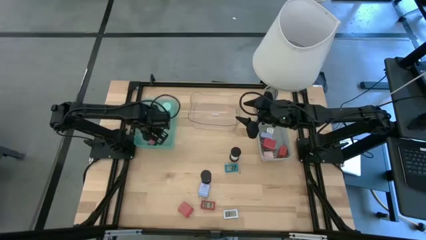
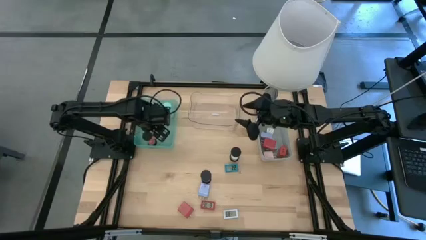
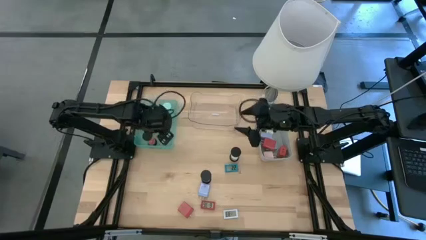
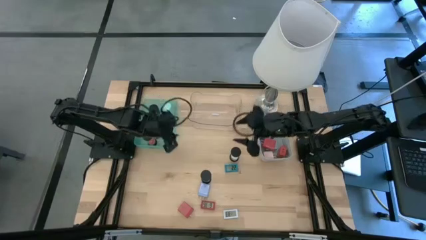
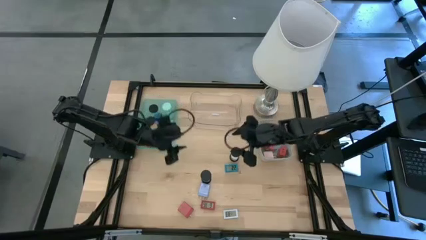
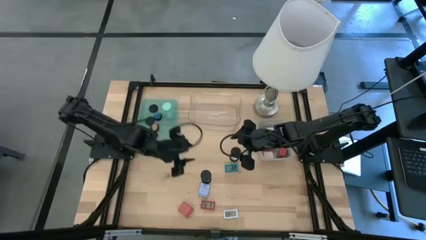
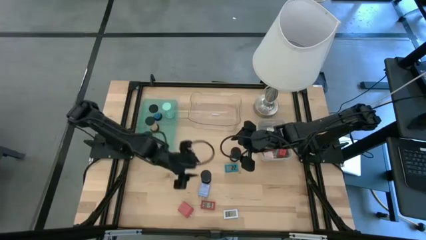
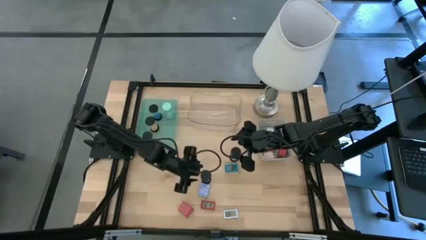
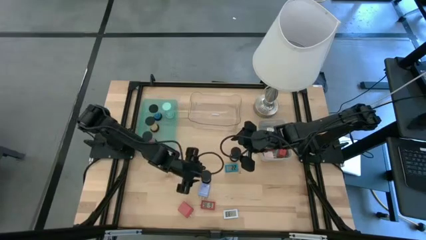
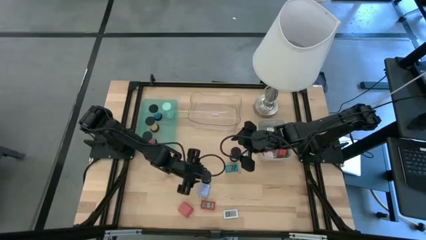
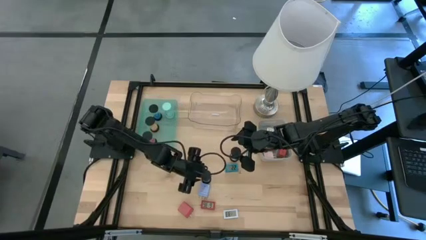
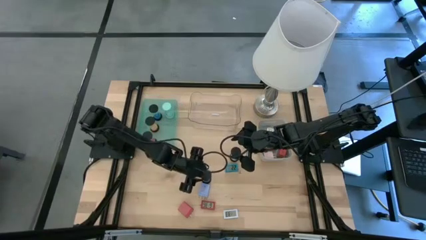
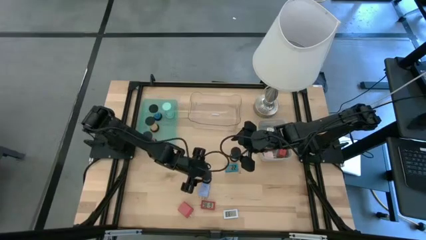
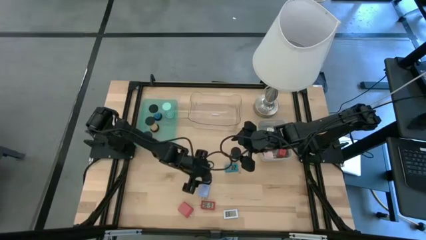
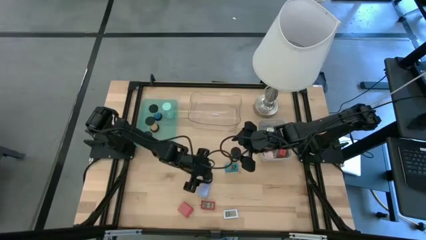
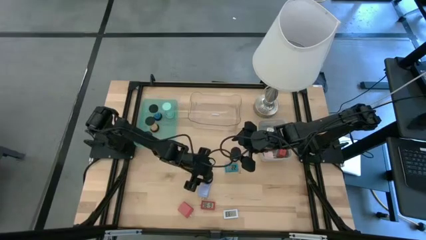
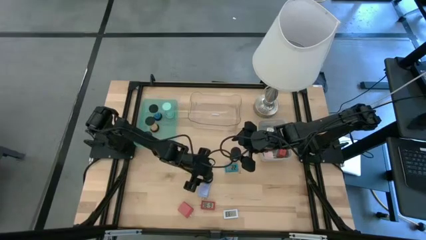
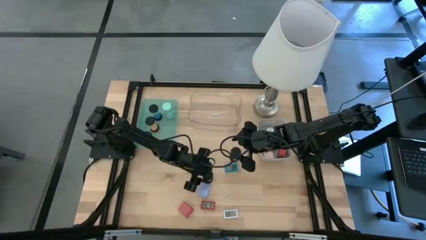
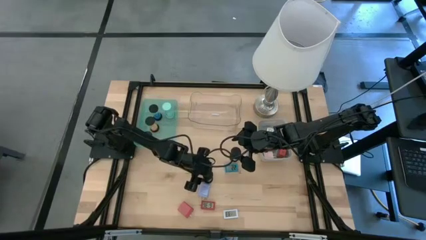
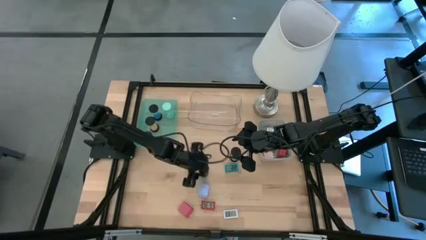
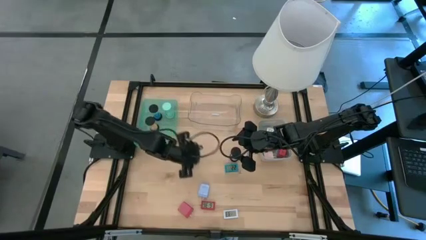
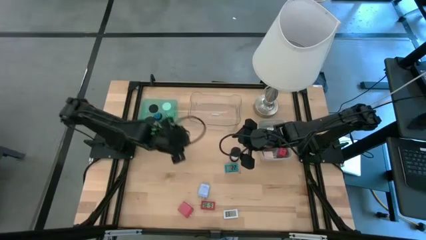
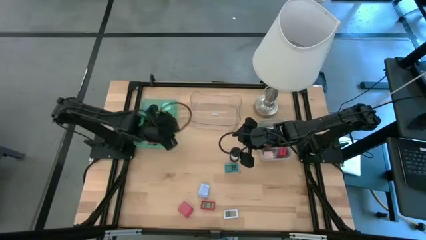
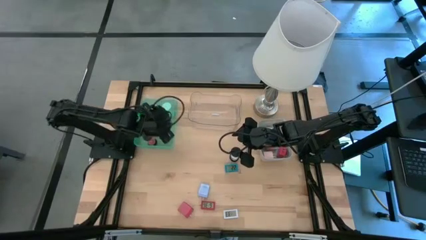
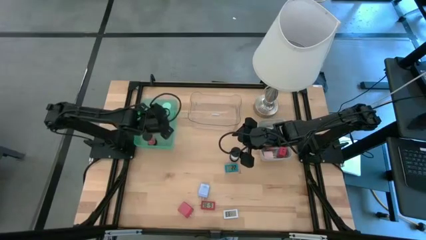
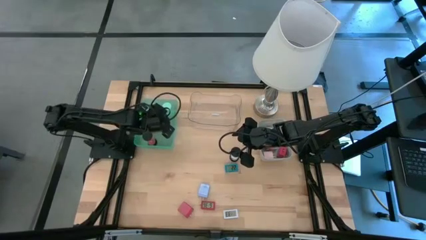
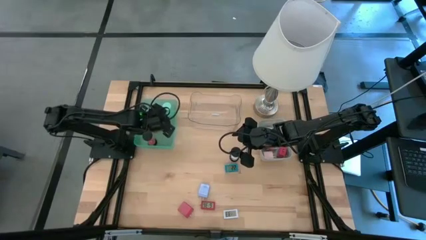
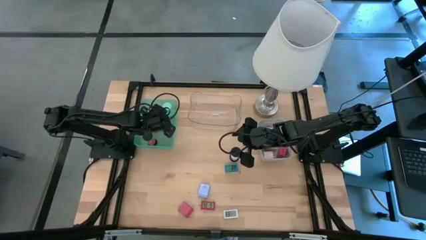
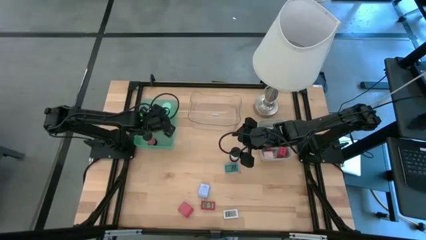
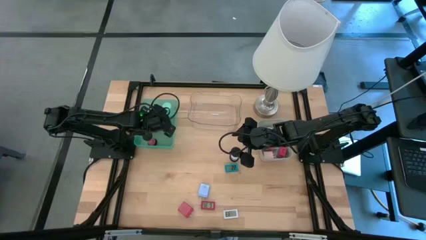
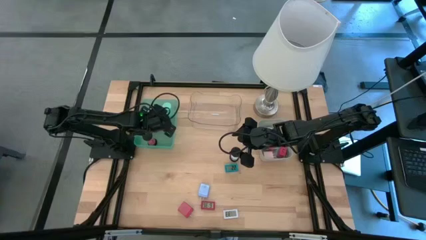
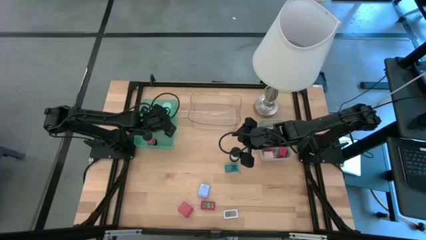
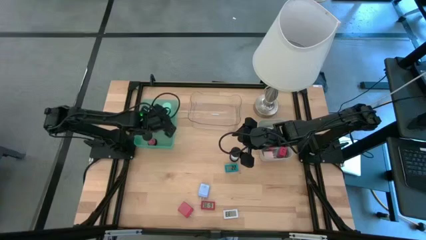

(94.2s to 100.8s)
Task: Pick & Place Office items
Put the black and blue hourglass into the green bin

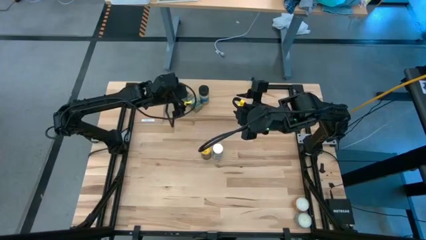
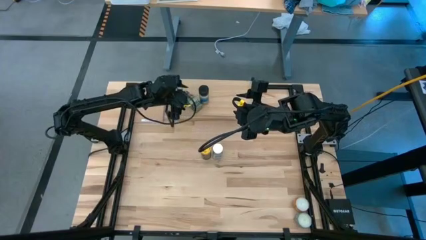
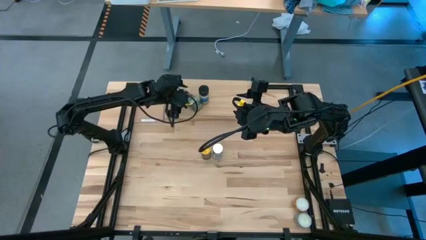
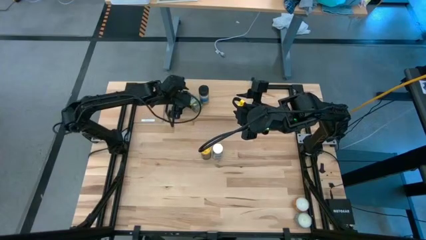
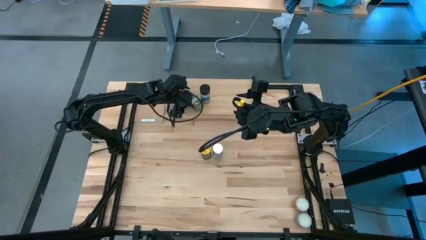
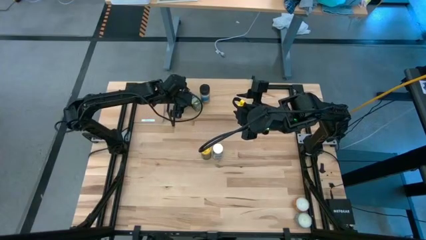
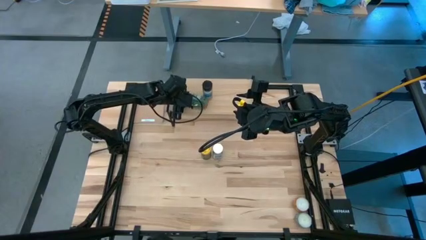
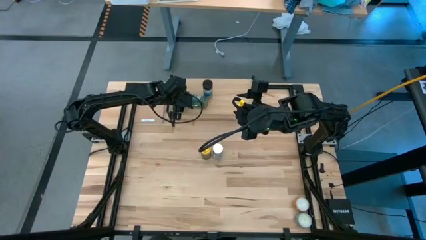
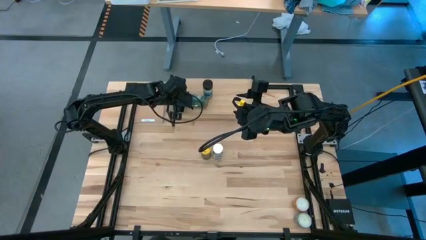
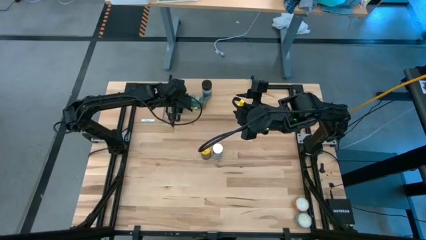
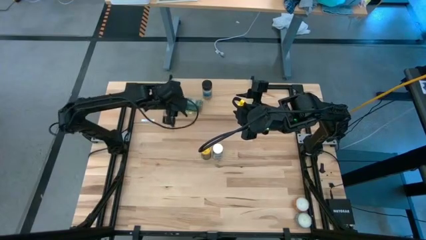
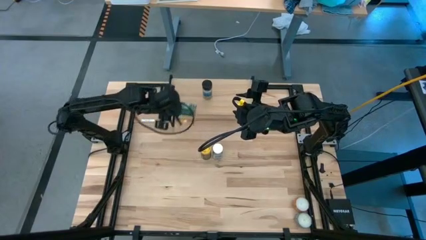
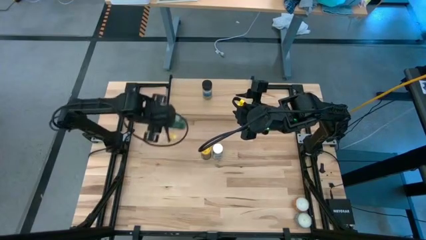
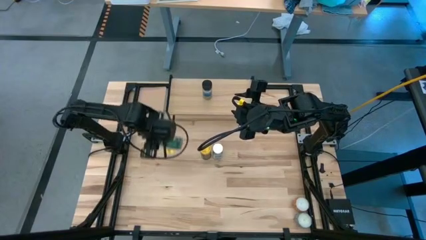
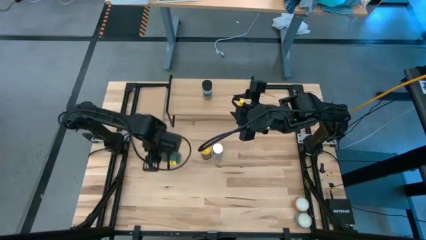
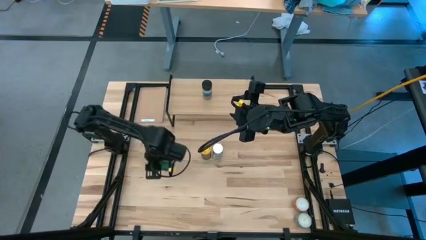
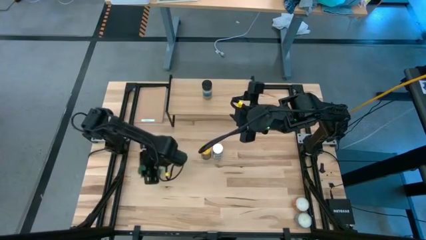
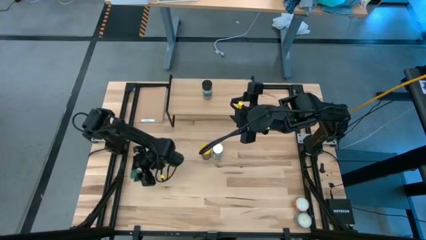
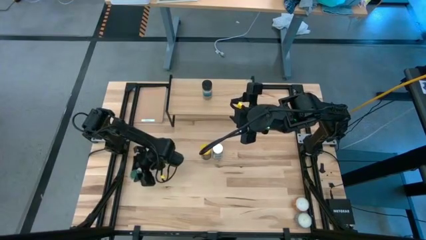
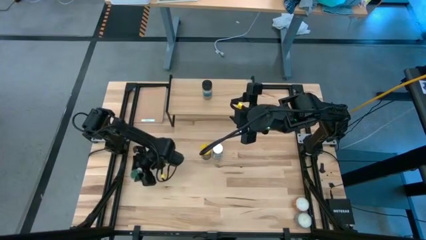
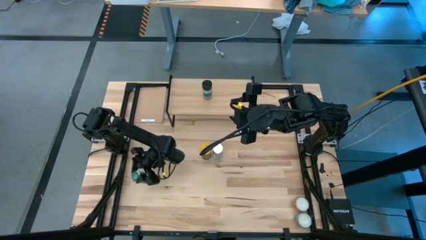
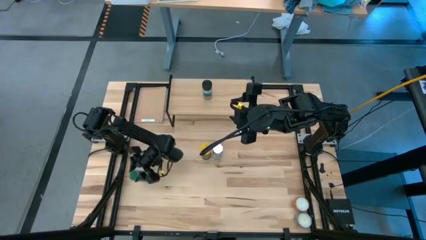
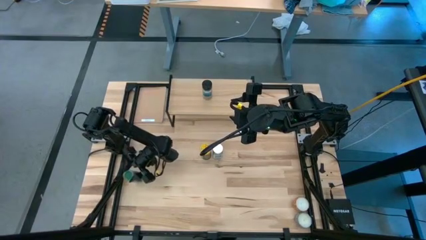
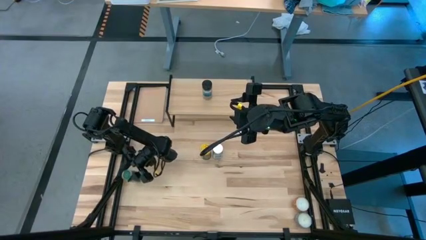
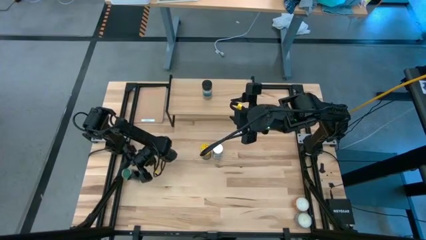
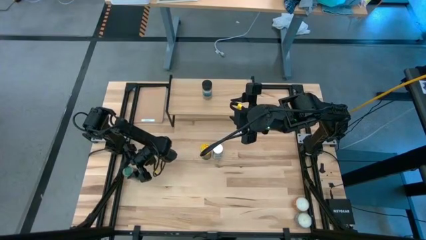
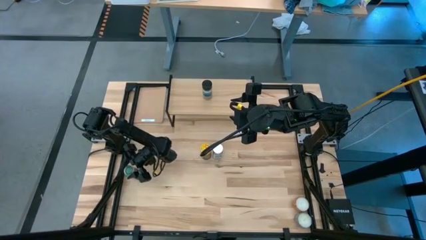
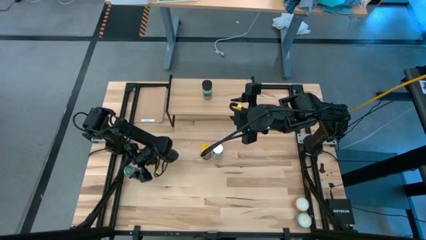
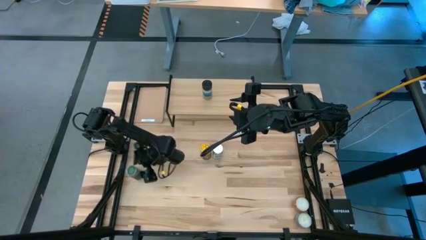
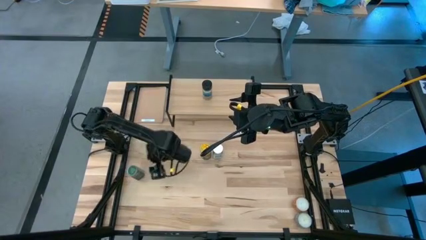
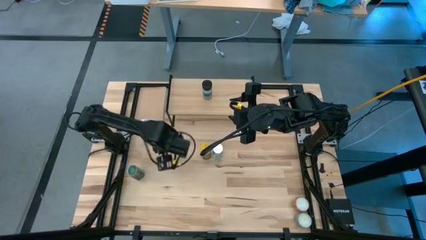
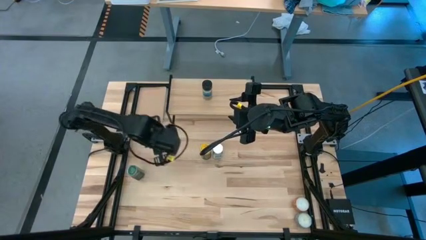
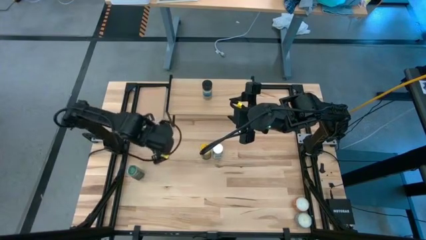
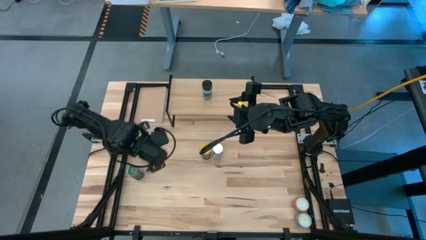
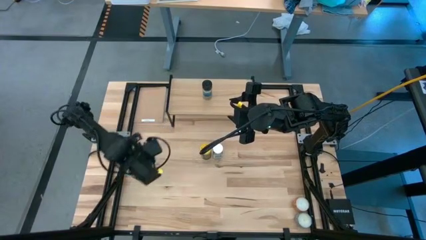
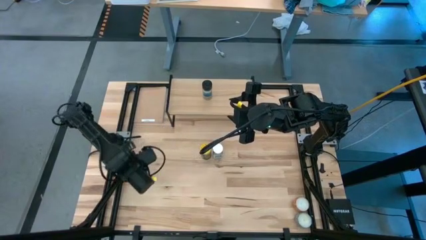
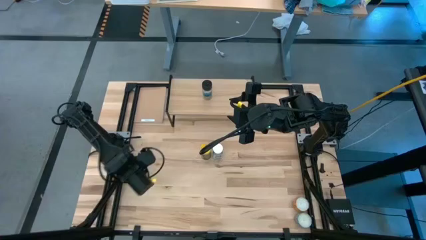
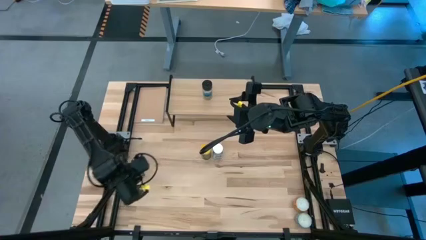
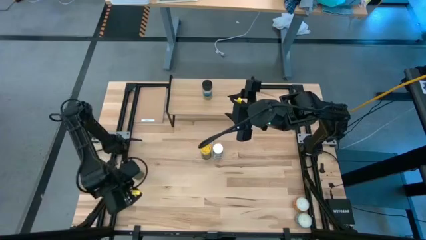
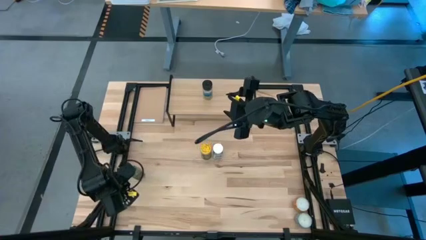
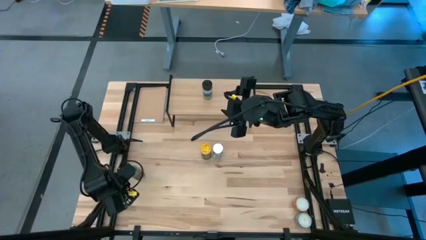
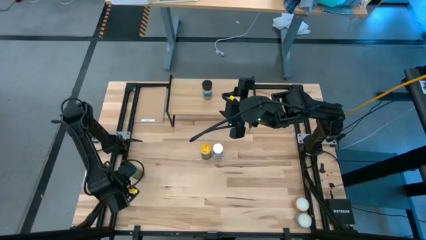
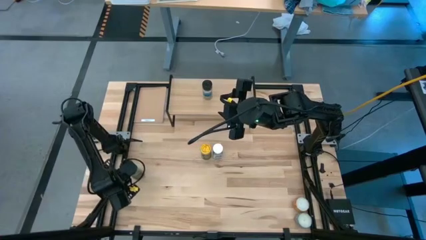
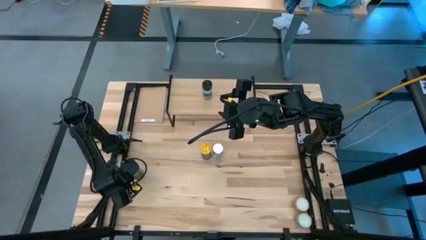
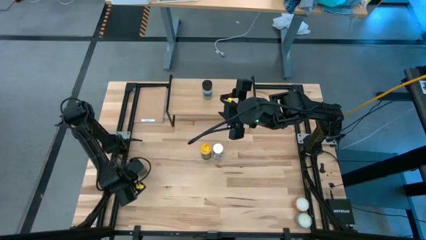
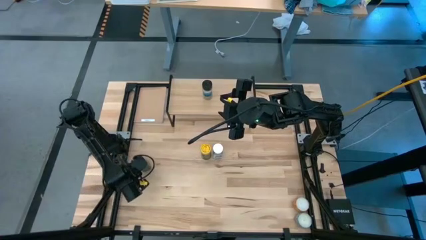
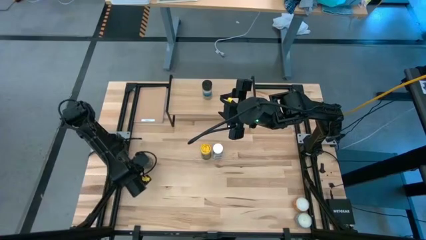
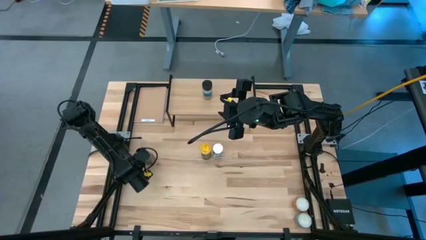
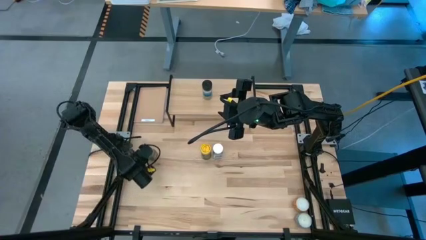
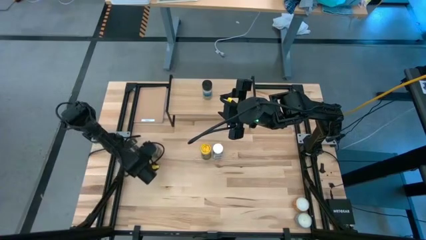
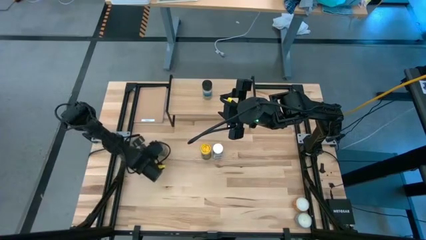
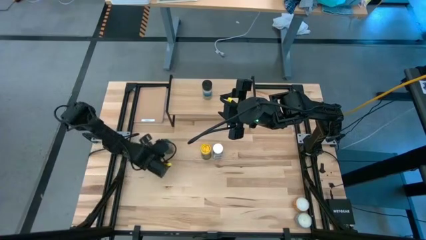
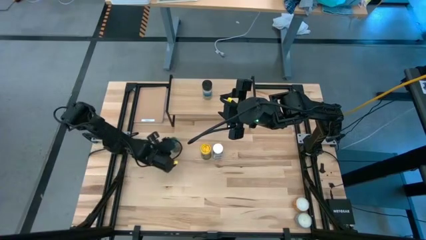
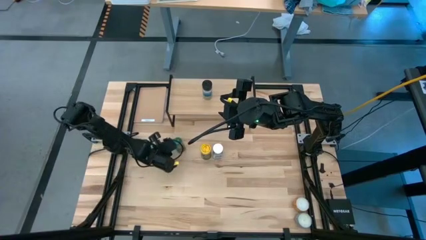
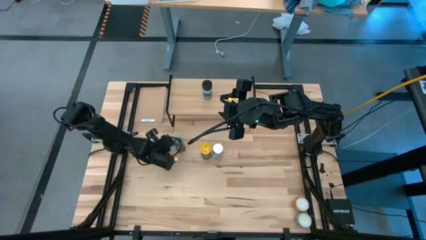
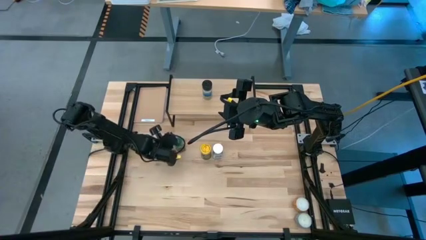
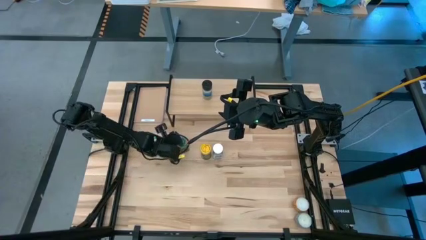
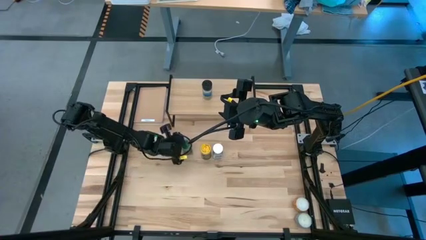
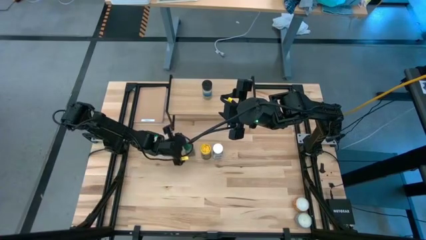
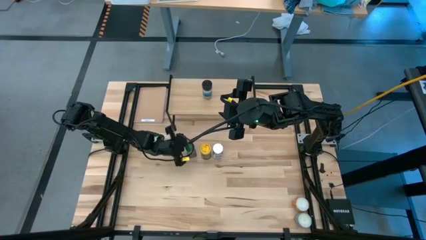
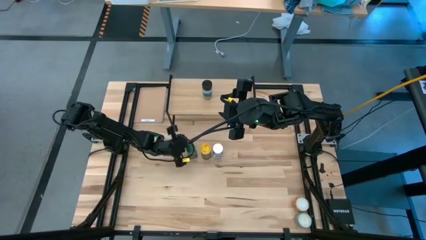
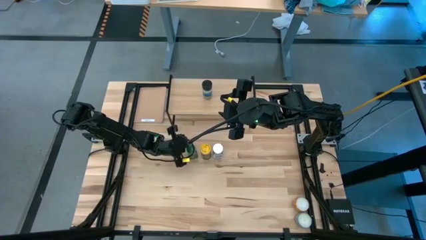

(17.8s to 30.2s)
Task: Shelf spices
Remove the green seasoning bottle from the shelf
